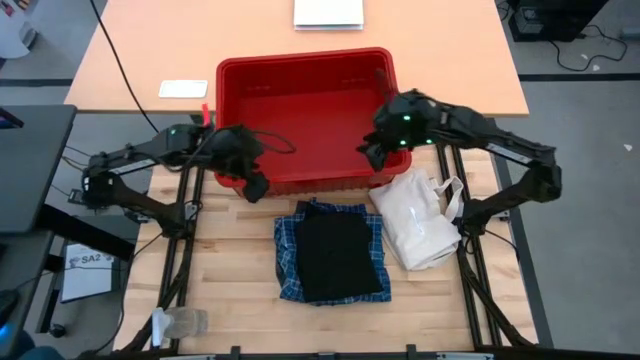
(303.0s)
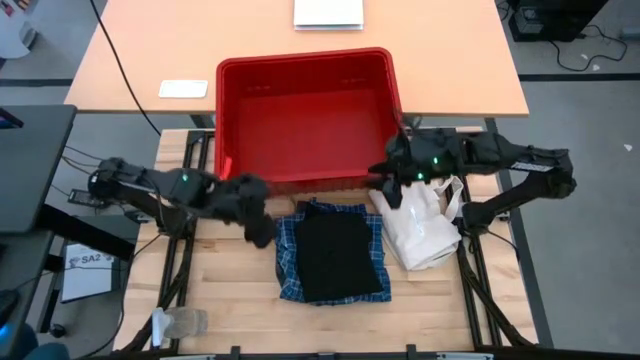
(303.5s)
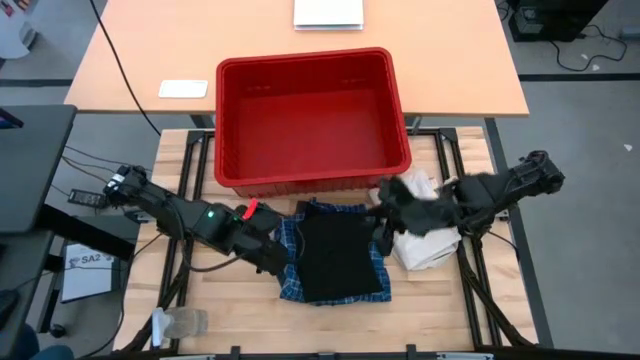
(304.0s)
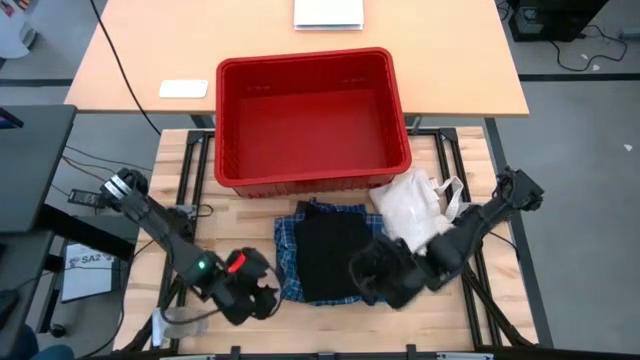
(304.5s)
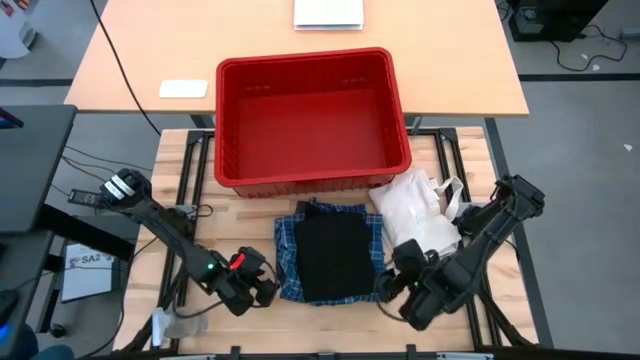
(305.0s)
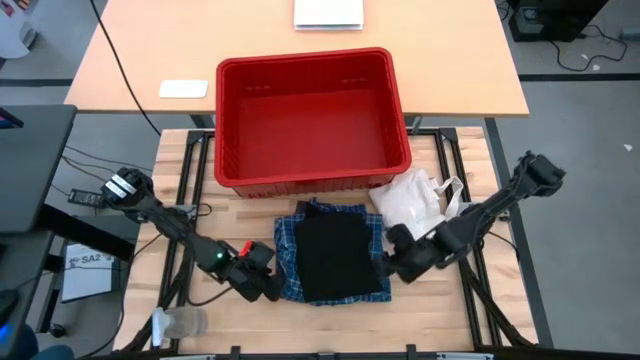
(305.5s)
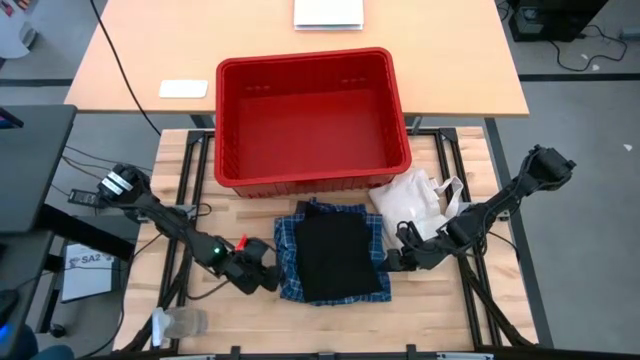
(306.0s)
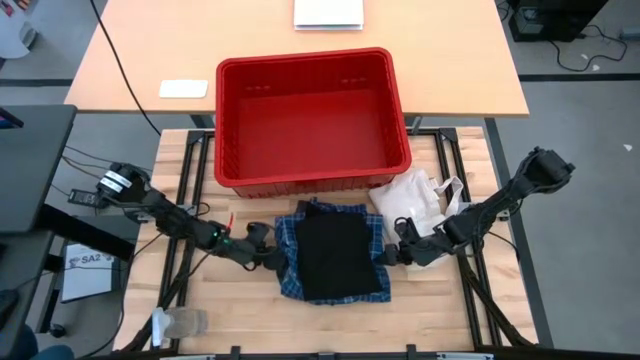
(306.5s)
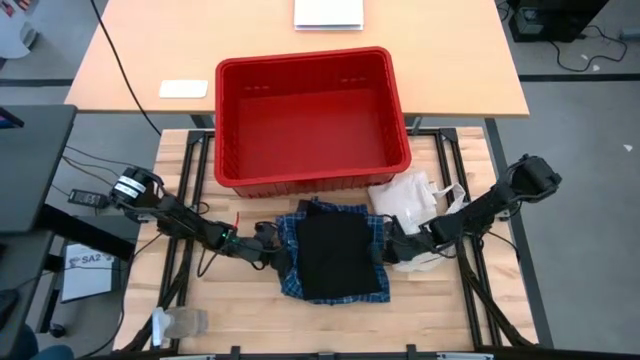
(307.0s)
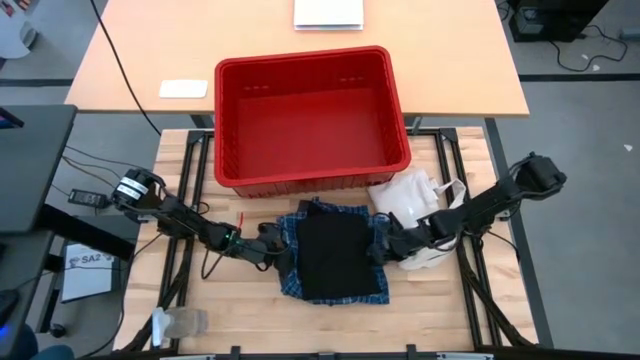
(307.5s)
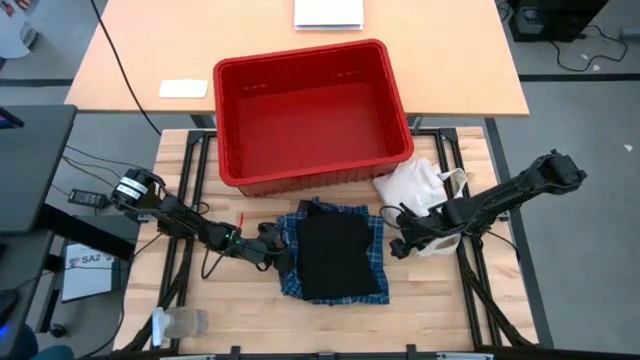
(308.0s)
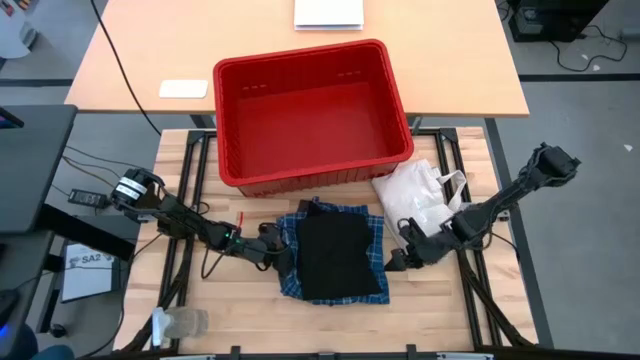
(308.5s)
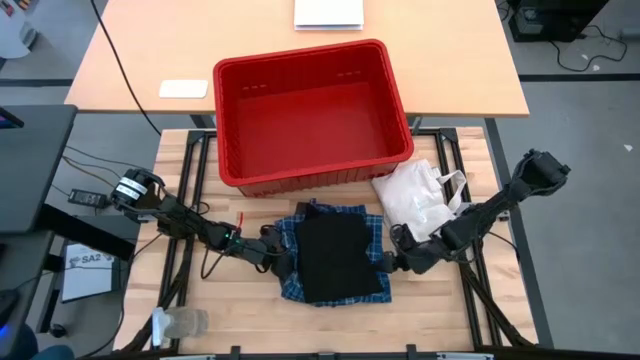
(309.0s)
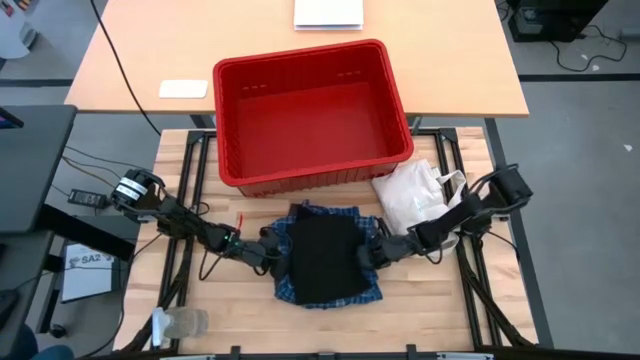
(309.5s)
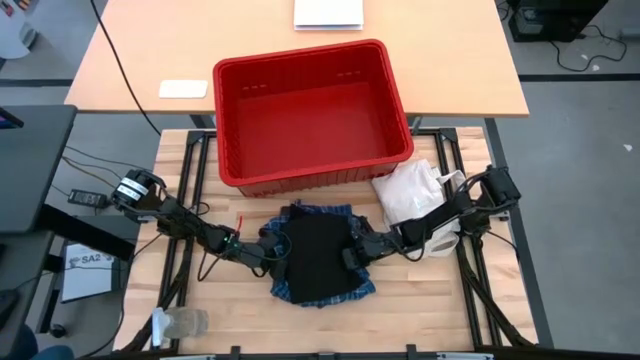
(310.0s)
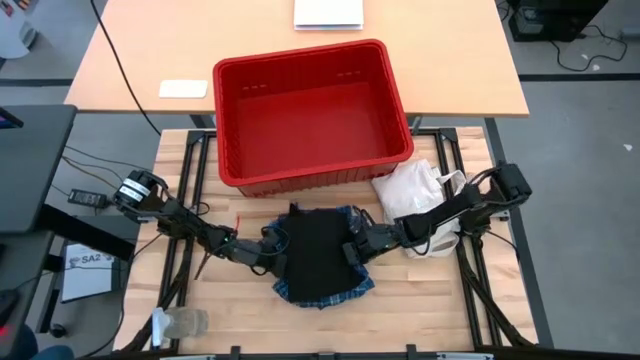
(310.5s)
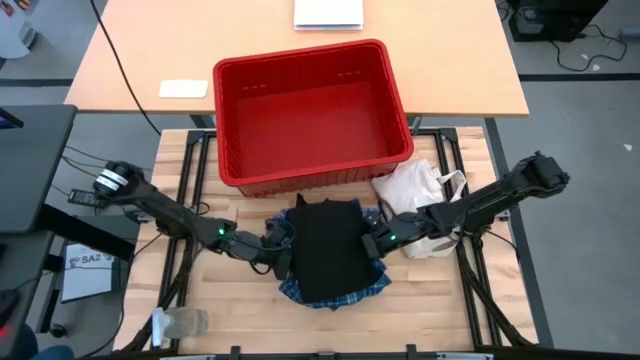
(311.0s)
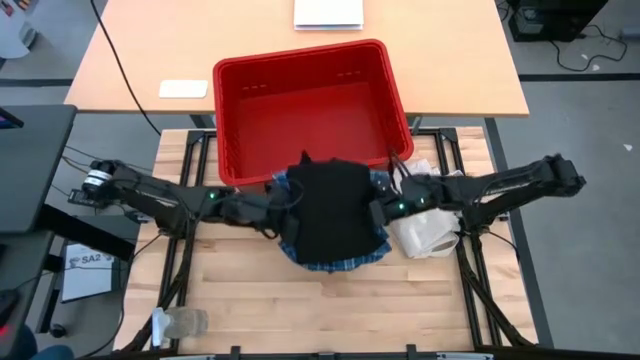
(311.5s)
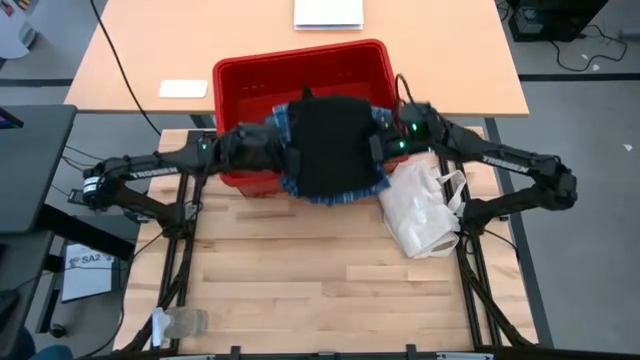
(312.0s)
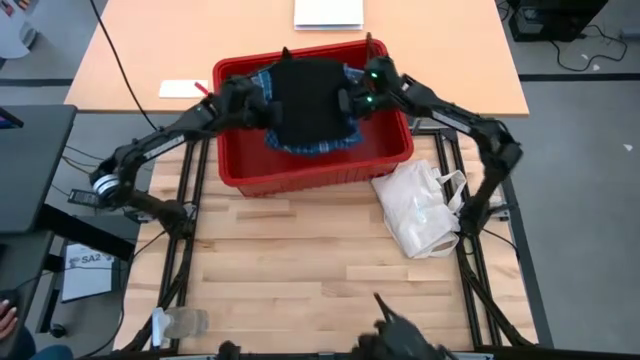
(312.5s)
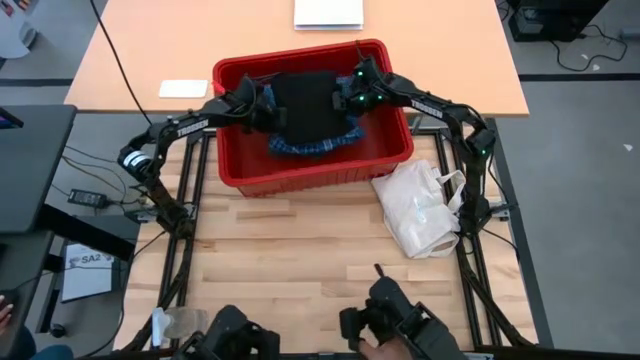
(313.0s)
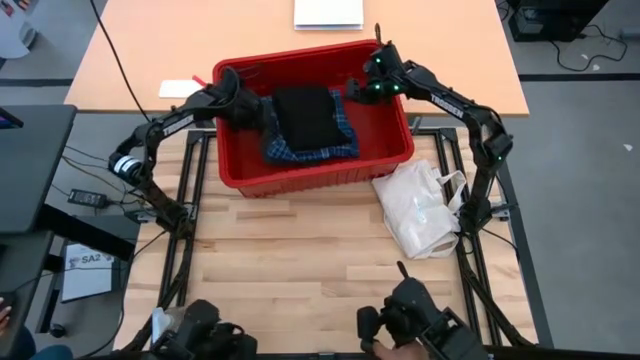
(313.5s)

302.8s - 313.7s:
Task: Fold Laundry from Bin
Put the stack of folded laundry into the laundry bin

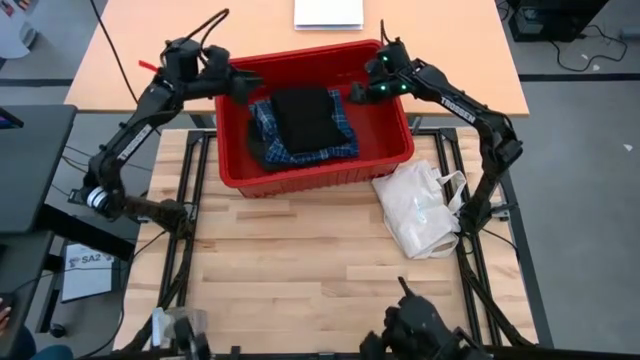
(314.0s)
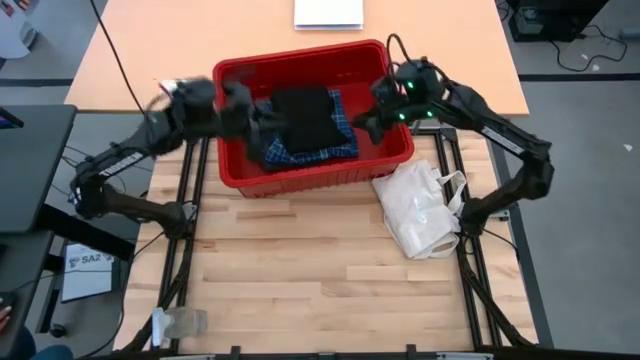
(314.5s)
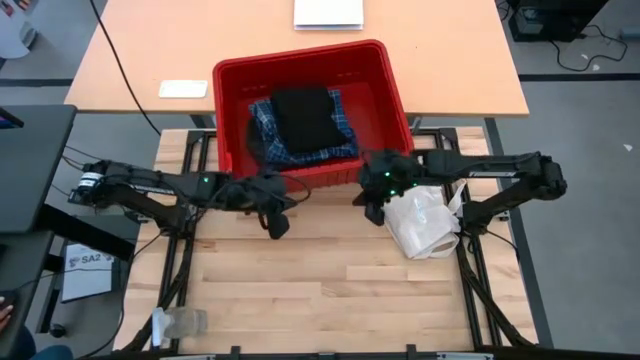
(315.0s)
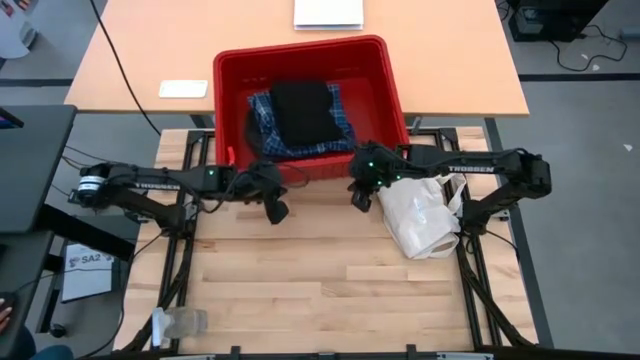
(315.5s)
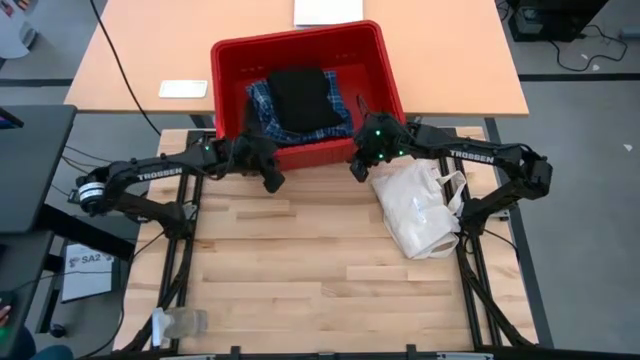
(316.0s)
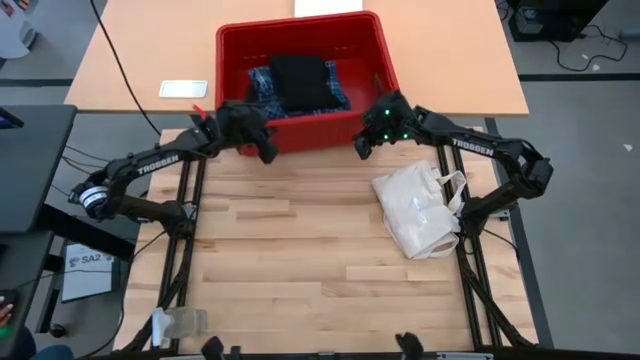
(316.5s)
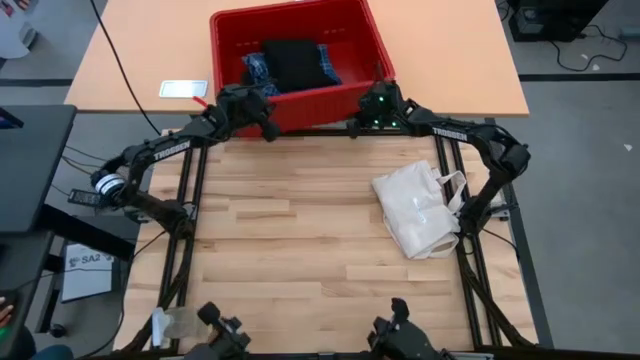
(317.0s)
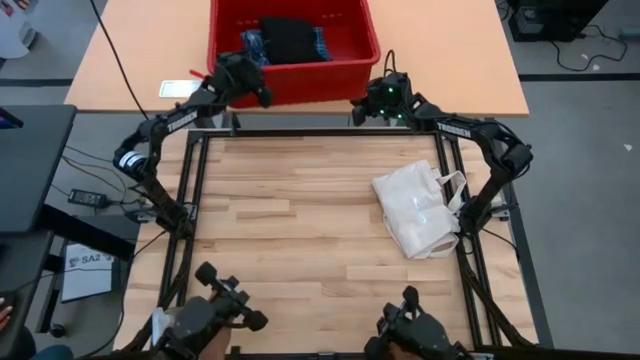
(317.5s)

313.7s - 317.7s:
Adjust the laundry bin

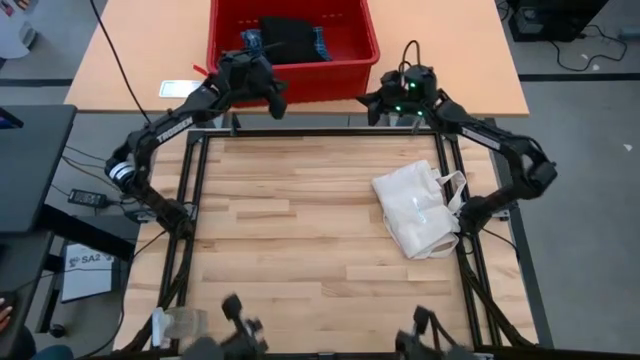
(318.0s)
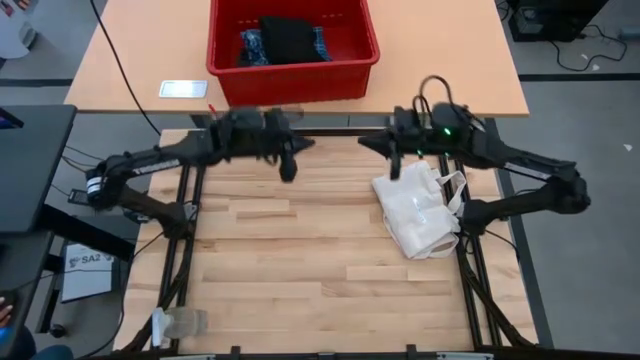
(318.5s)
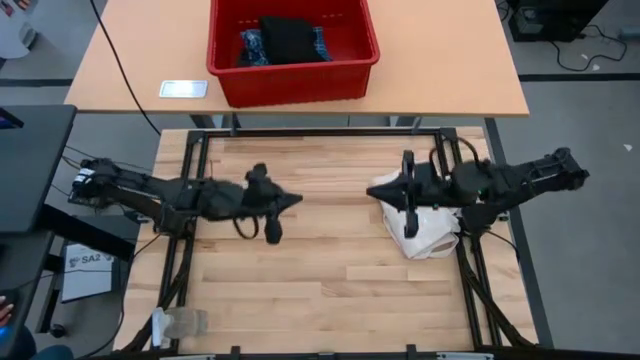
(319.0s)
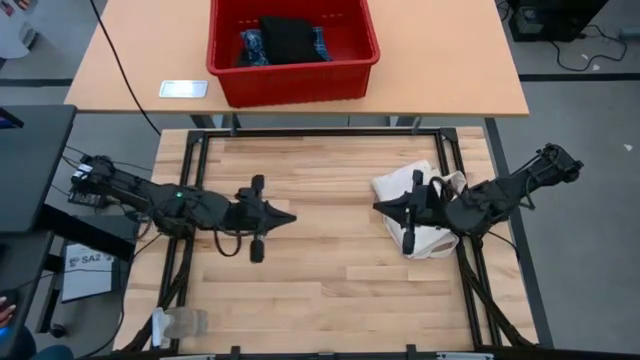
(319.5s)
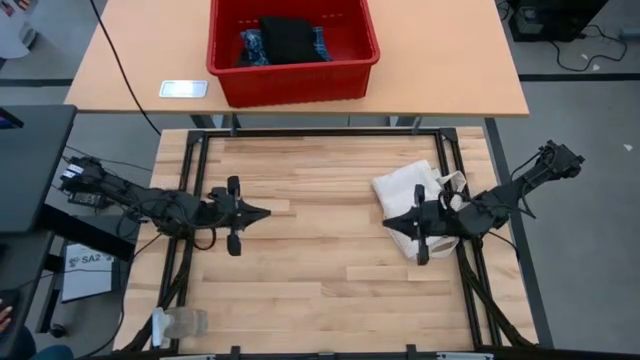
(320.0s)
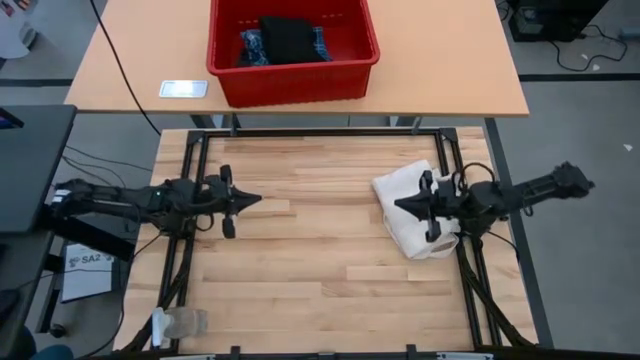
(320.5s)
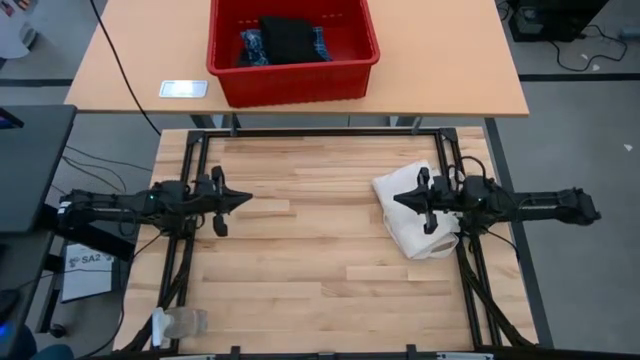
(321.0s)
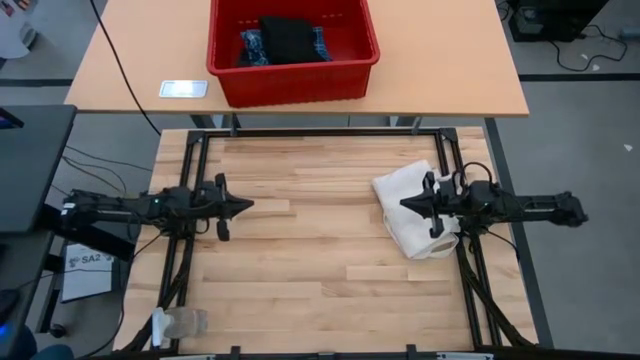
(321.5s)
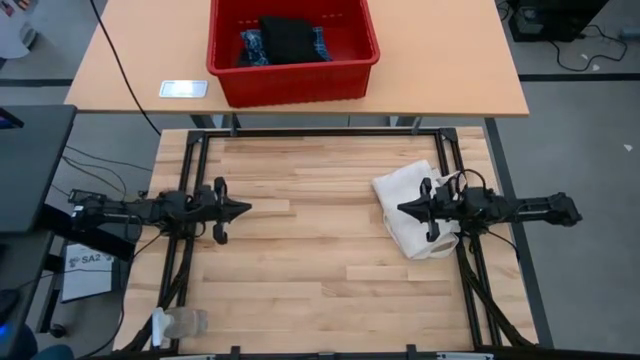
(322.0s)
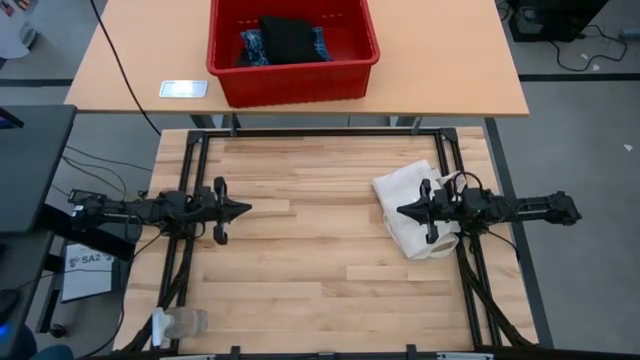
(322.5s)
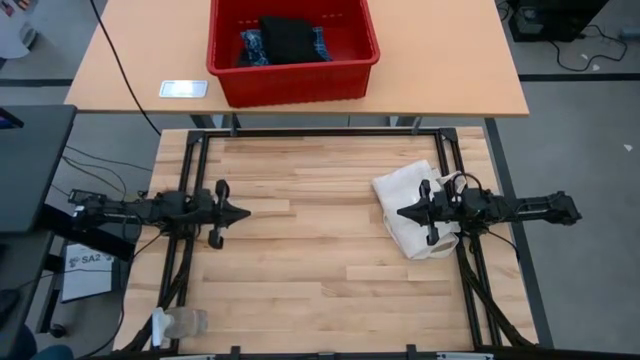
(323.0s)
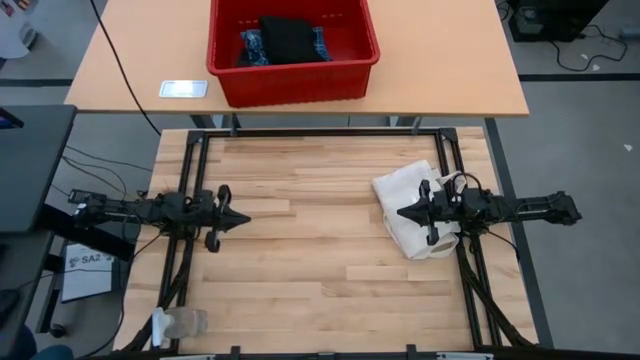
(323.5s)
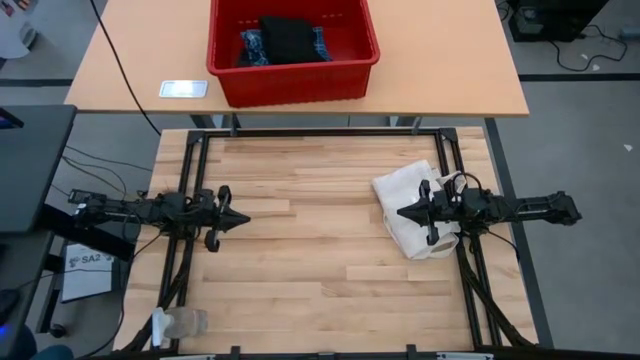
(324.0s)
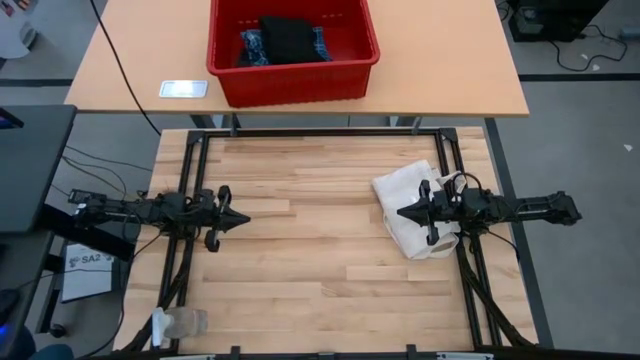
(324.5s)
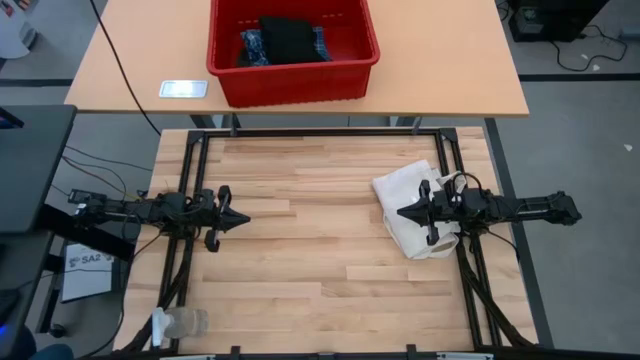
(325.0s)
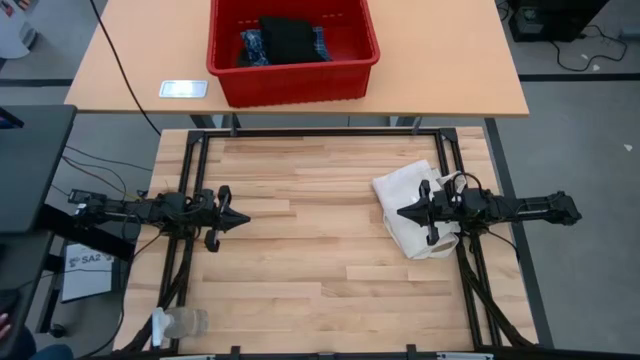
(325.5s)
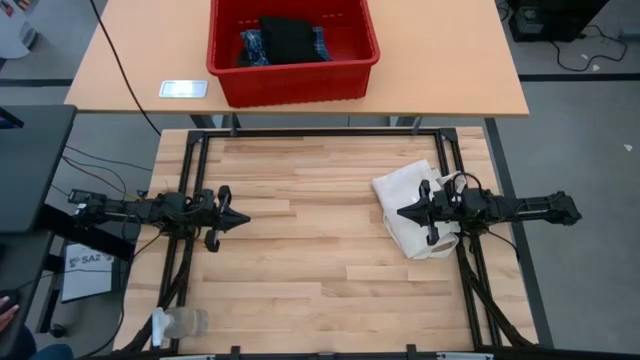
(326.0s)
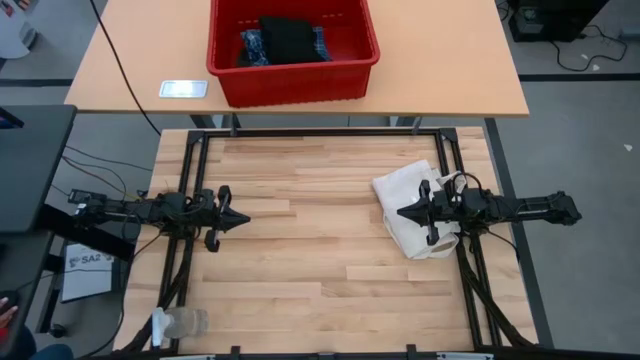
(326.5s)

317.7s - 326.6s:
Return to home position
